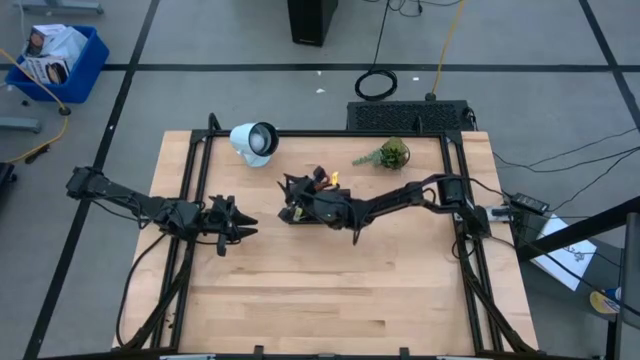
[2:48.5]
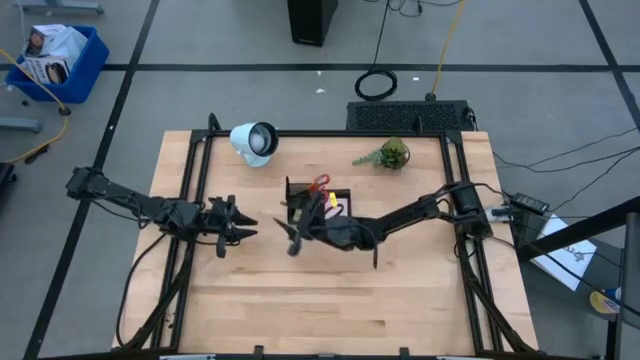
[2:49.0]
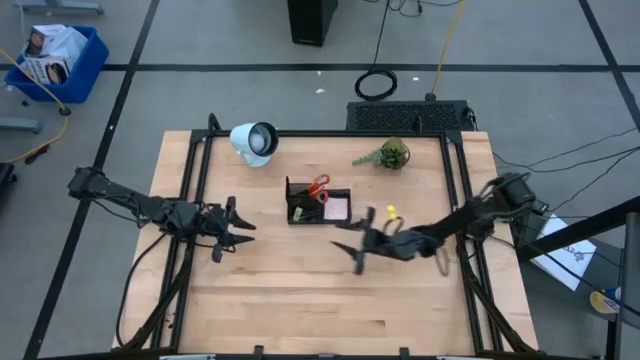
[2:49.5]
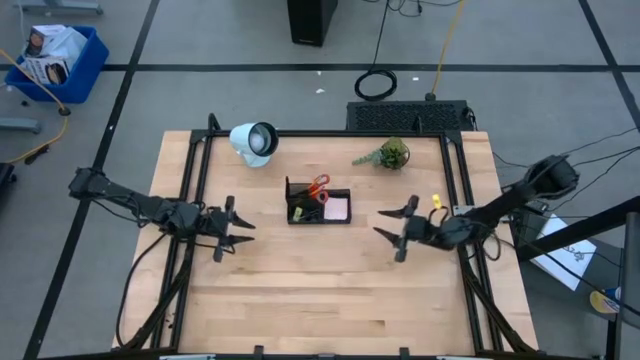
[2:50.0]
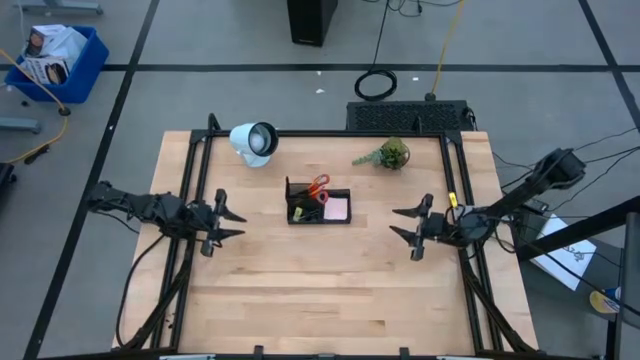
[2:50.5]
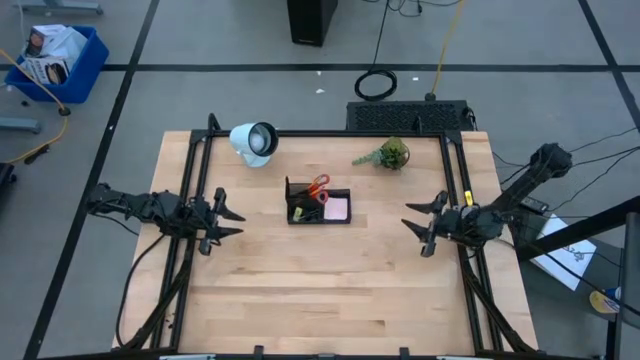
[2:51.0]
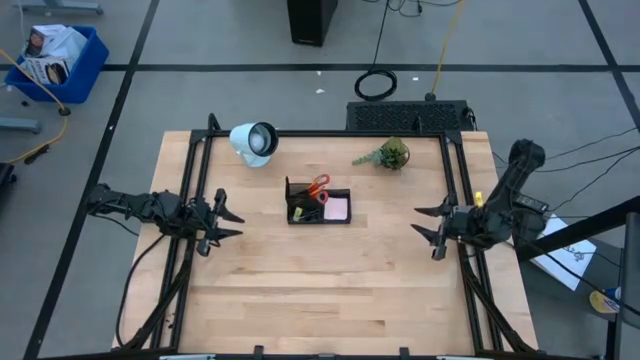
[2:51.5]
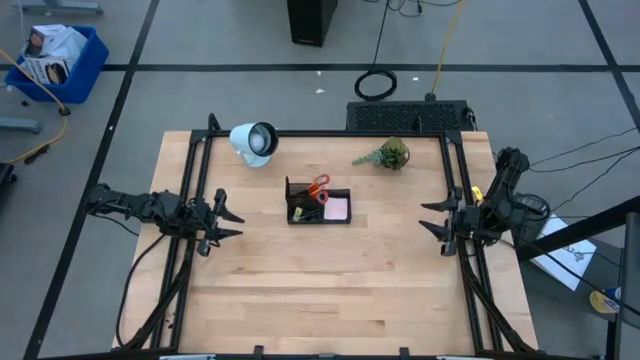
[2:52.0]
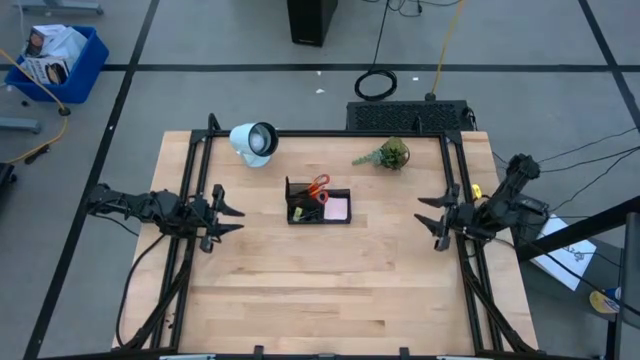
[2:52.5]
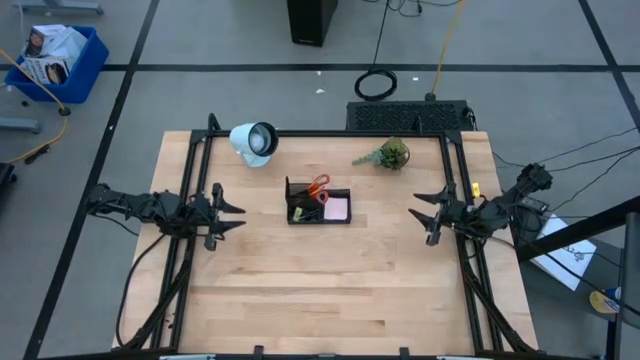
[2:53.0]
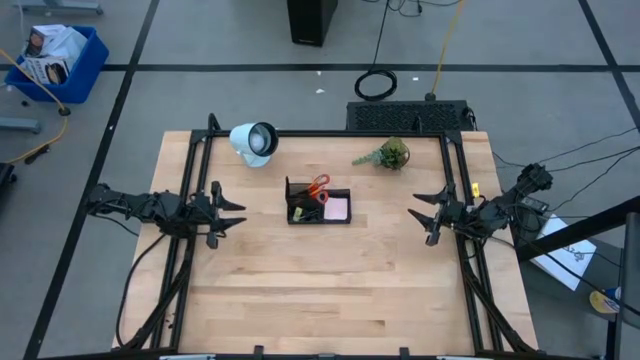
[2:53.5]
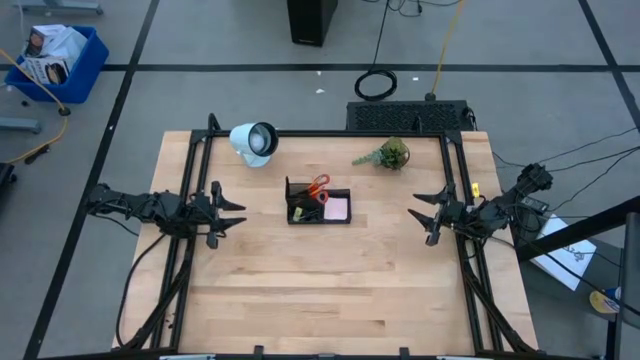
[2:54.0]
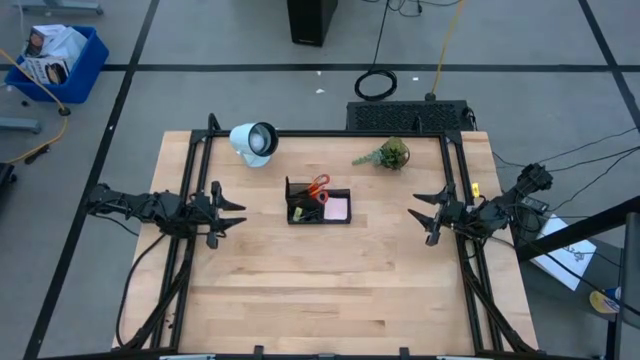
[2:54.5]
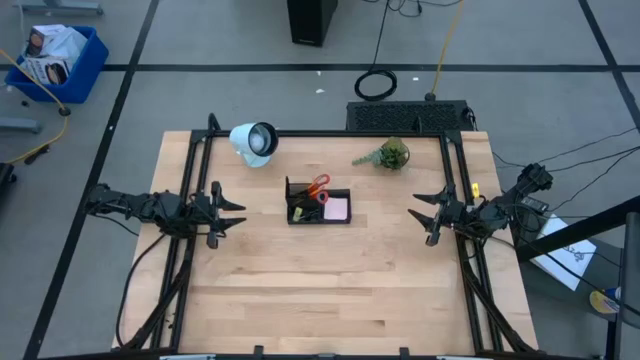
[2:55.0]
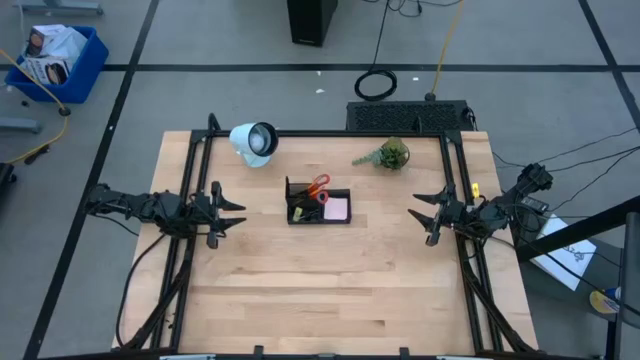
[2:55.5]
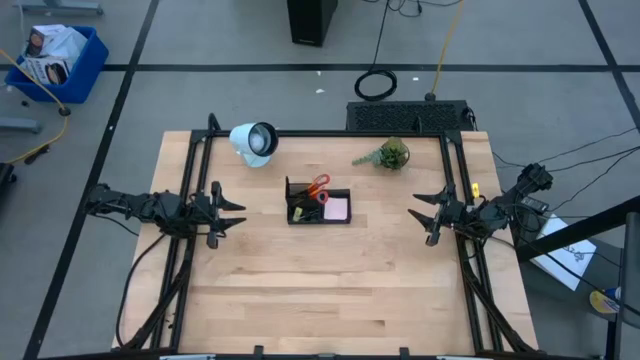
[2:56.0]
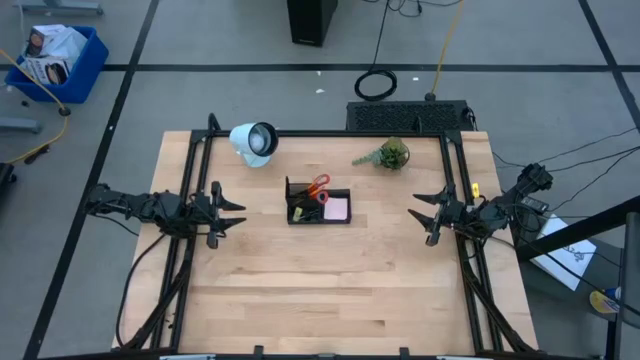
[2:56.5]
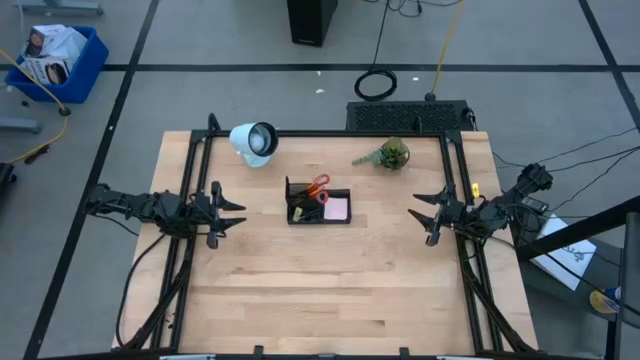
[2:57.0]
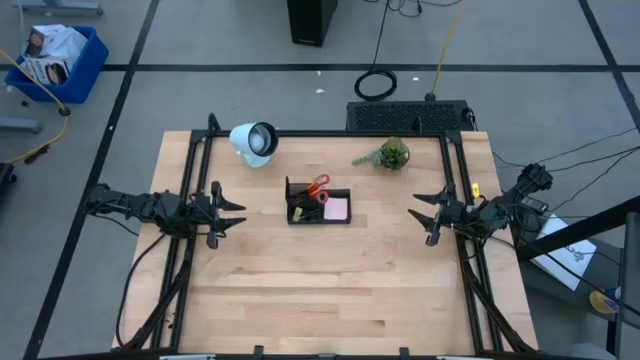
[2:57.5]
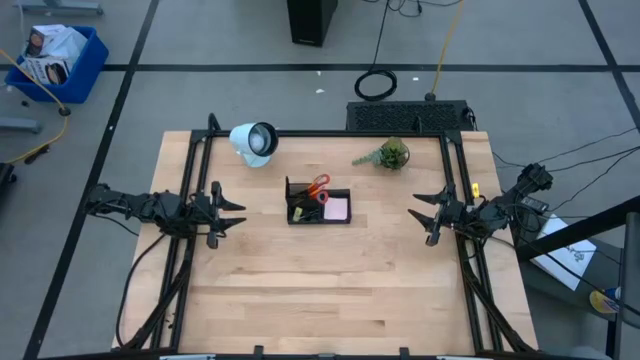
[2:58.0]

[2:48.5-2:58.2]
Task: Pick and place office supplies into organizer
Return to Home Position

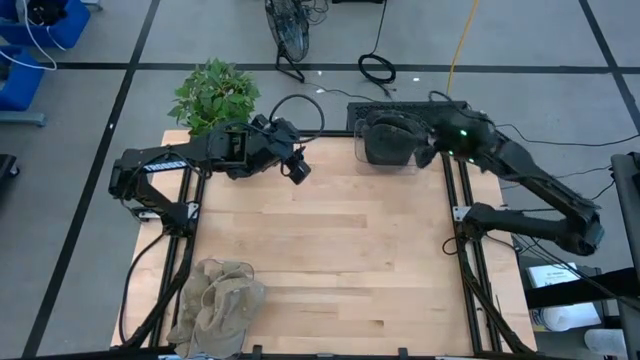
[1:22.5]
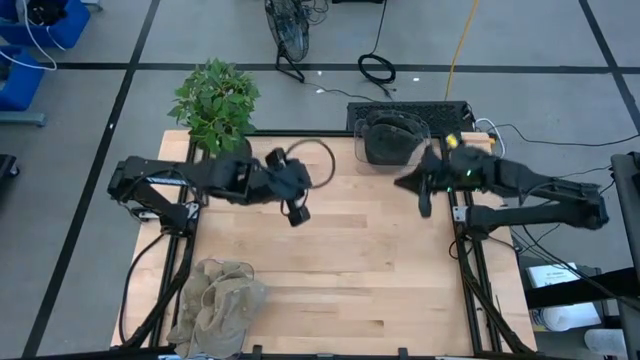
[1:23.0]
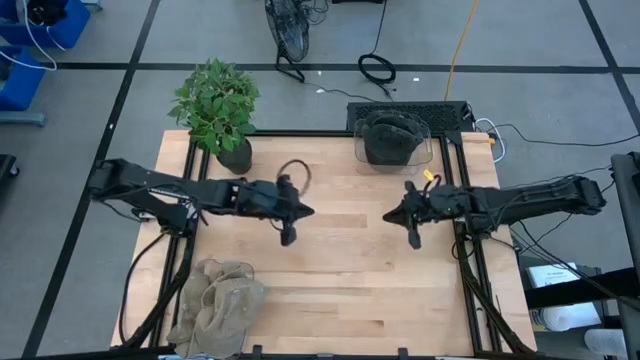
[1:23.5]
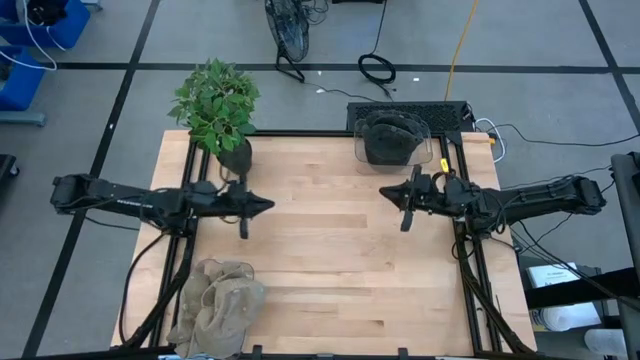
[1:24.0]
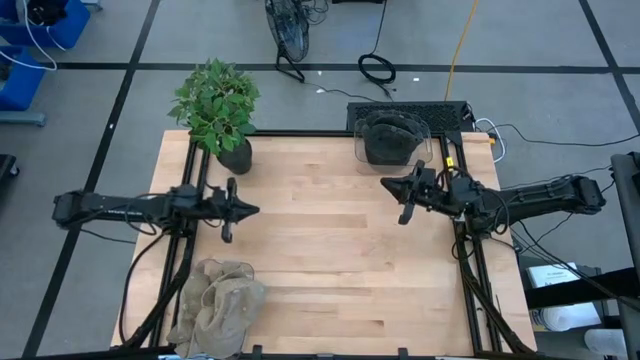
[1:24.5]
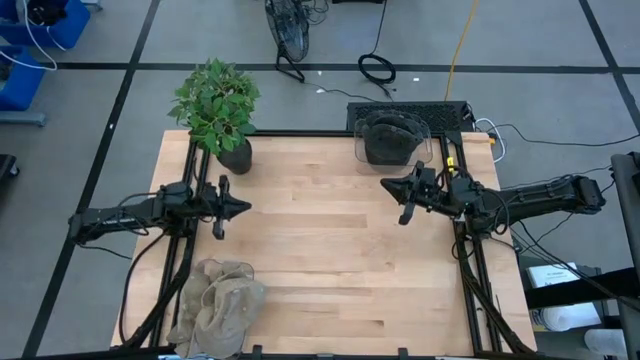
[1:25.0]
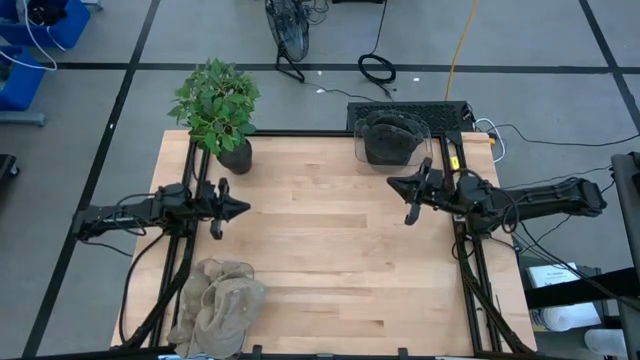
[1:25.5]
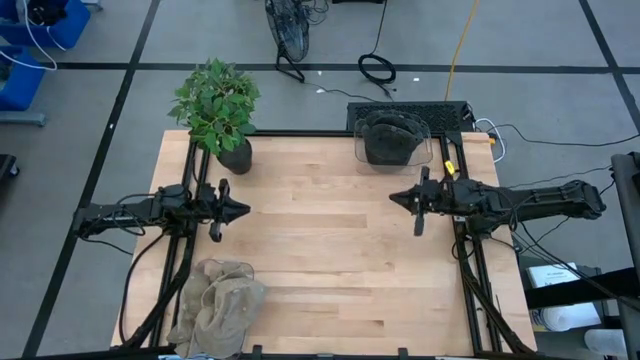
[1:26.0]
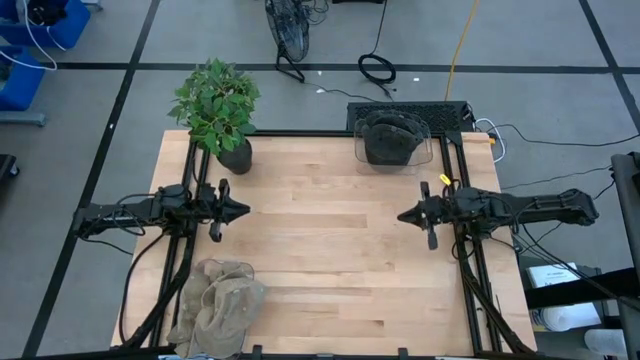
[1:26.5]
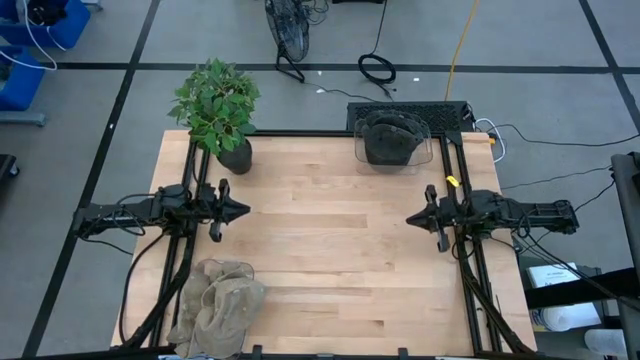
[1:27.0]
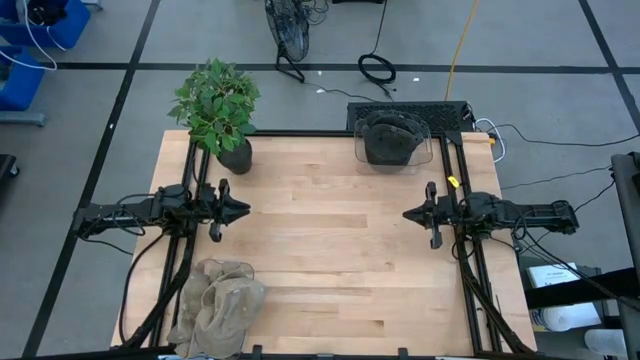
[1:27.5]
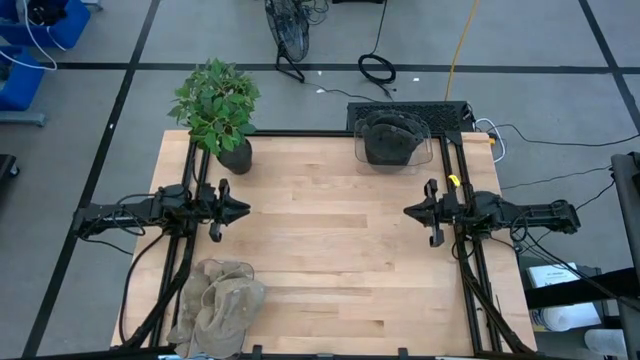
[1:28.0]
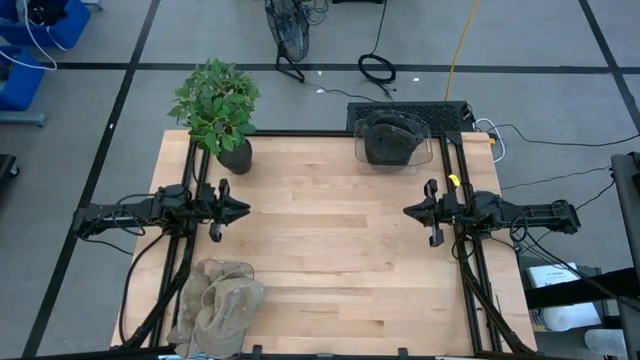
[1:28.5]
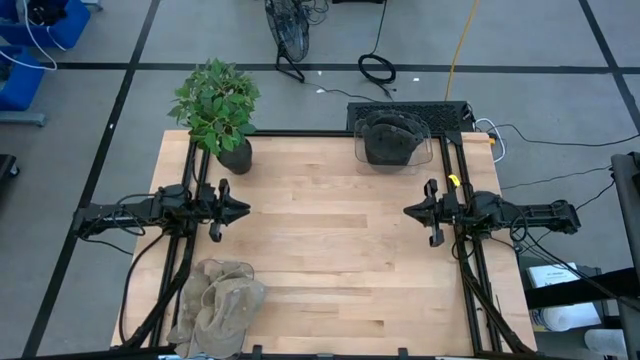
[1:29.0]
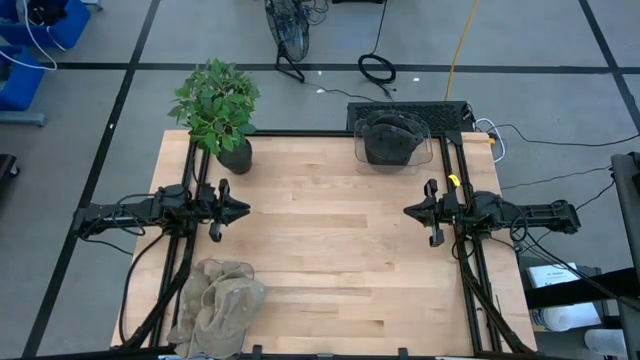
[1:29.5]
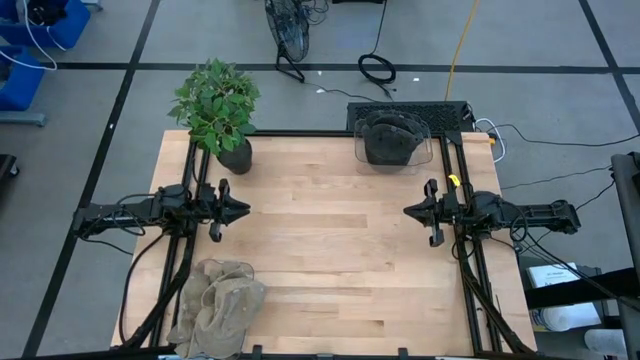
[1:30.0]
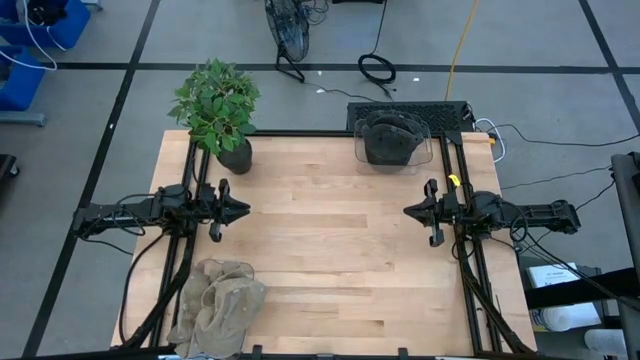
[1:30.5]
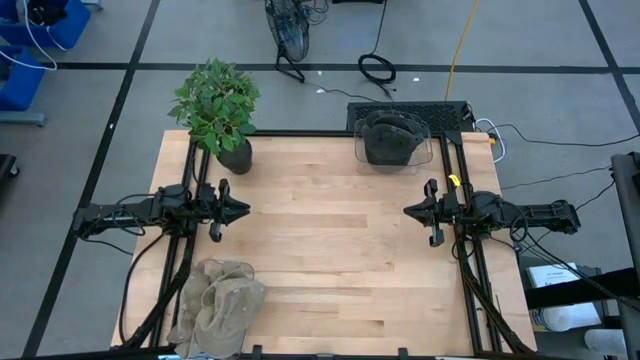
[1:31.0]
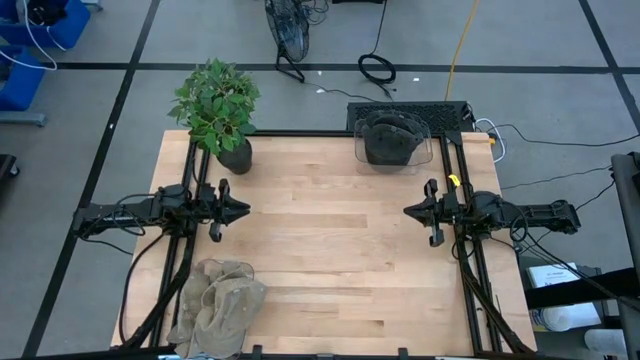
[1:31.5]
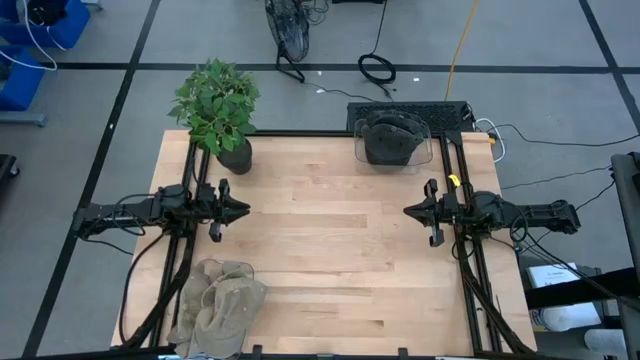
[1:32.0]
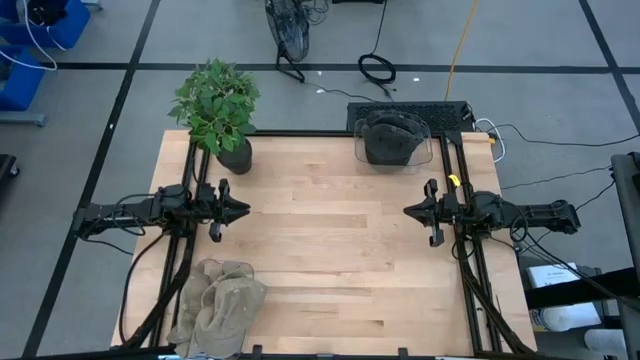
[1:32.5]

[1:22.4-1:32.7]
Task: Pick & Place hat
Return to Home Position
